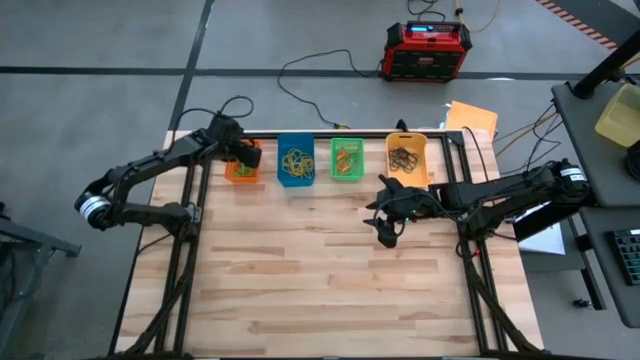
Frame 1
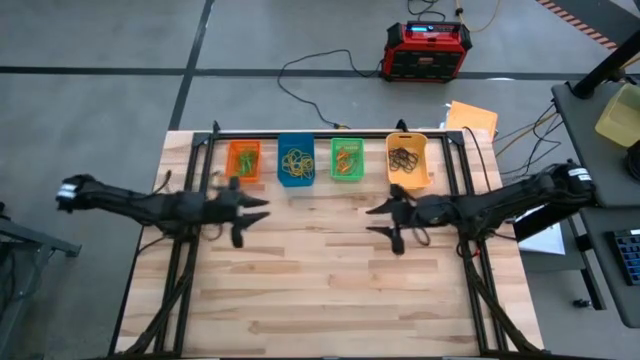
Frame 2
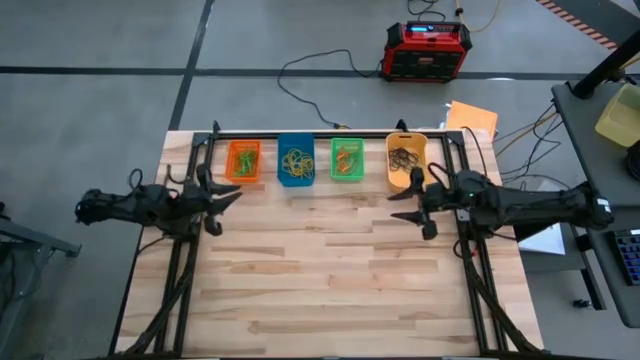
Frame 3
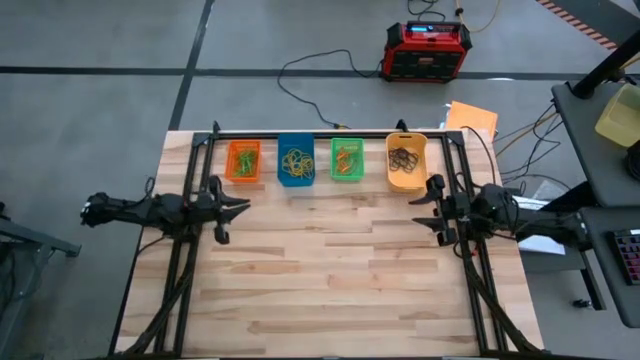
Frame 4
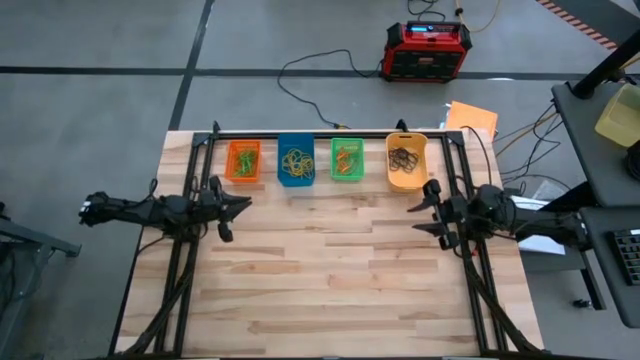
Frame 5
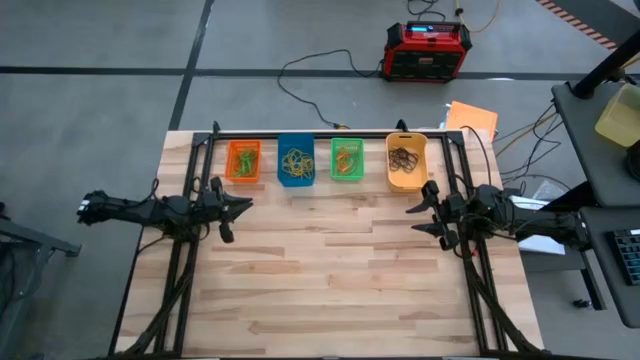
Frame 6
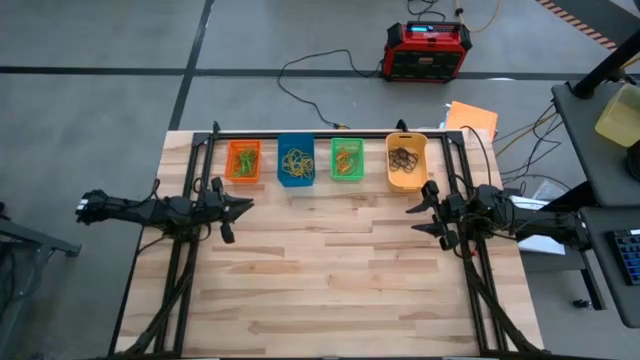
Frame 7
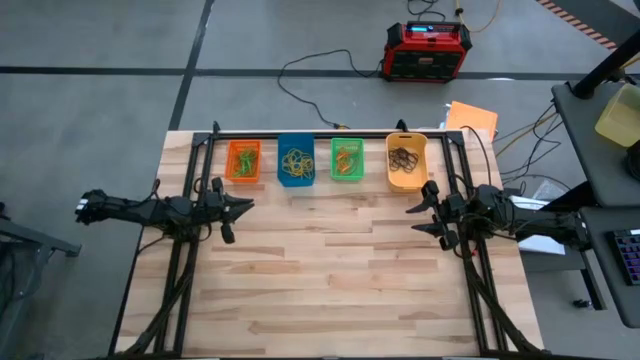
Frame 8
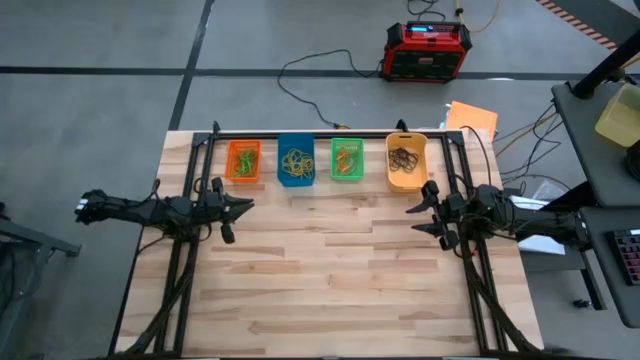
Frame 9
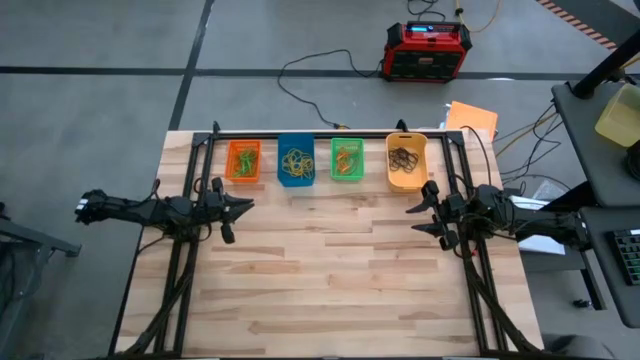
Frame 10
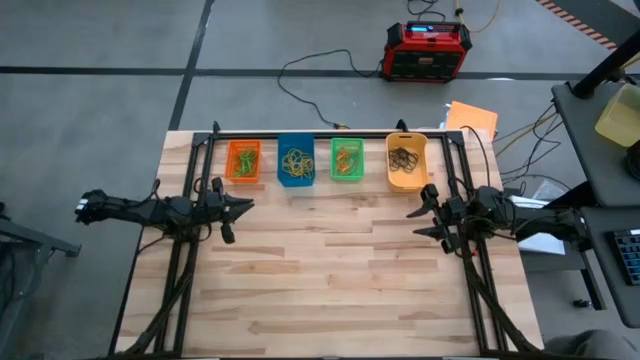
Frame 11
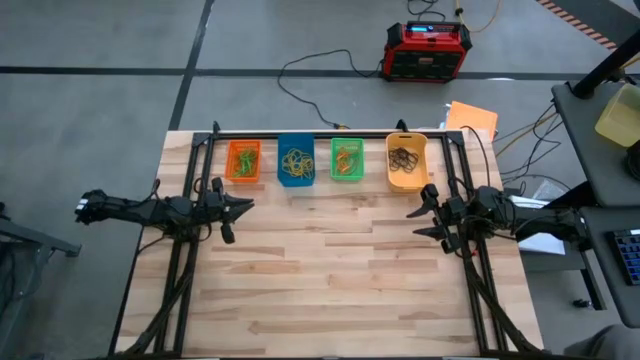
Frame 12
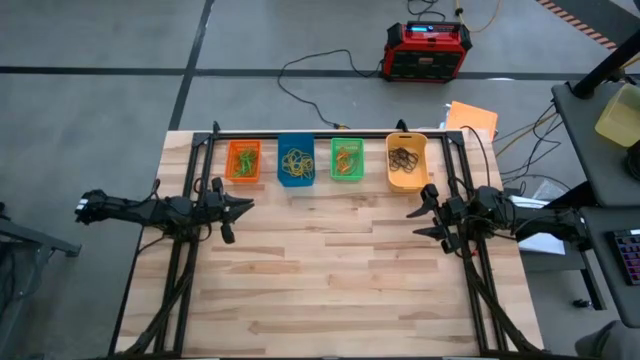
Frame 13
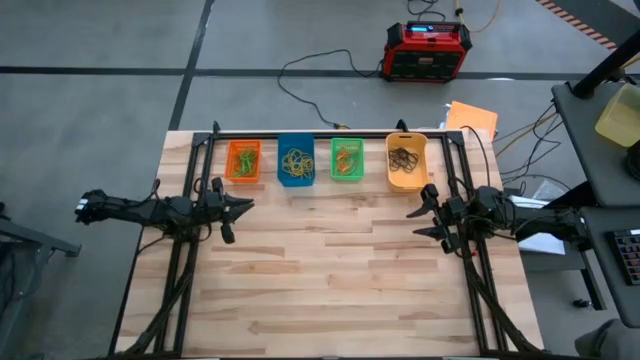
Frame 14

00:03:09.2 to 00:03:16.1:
Task: Sort rubber bands into baskets
Return to Home Position

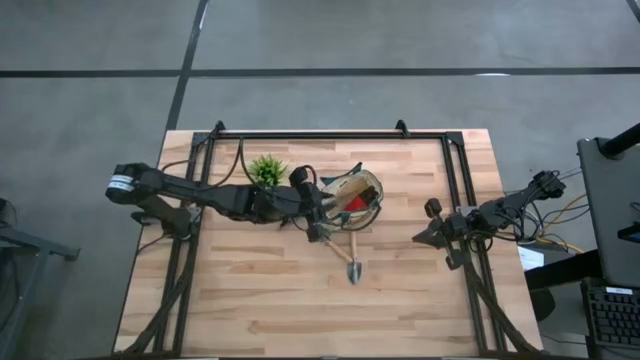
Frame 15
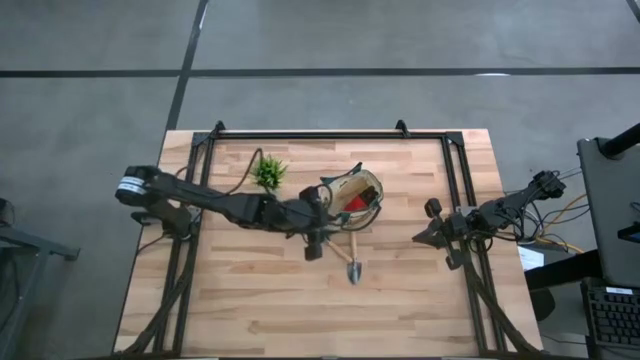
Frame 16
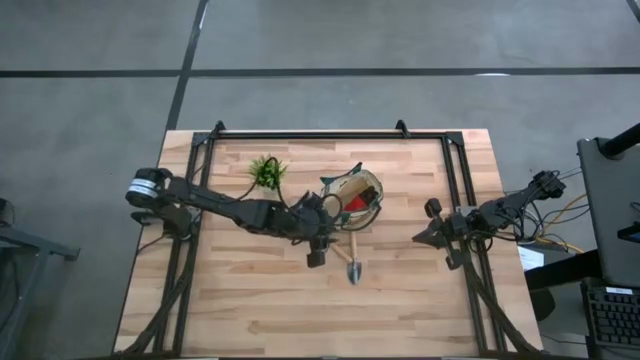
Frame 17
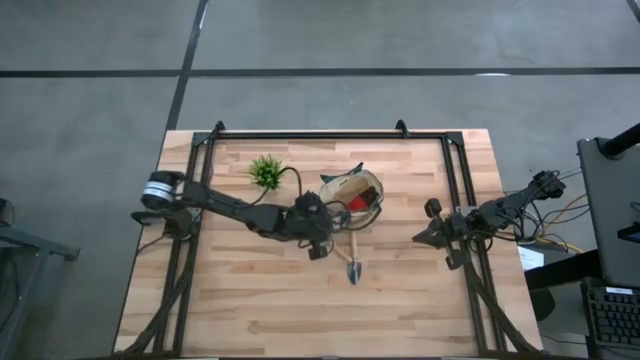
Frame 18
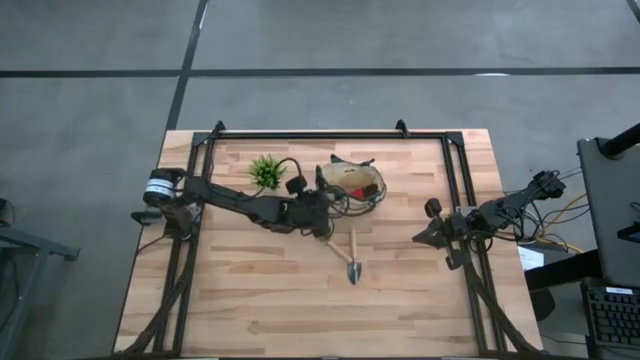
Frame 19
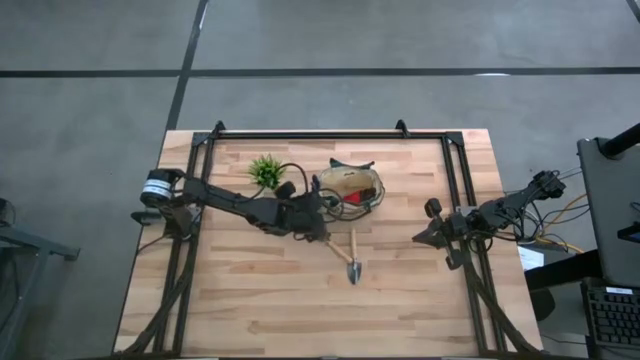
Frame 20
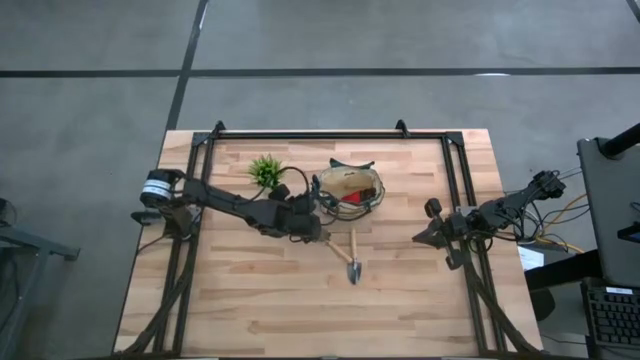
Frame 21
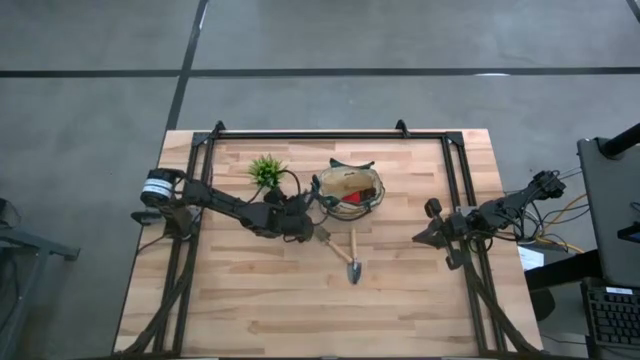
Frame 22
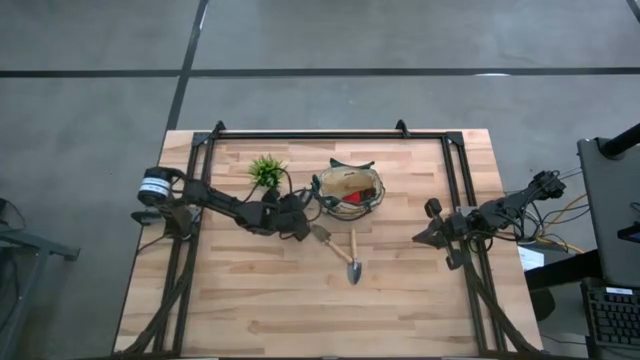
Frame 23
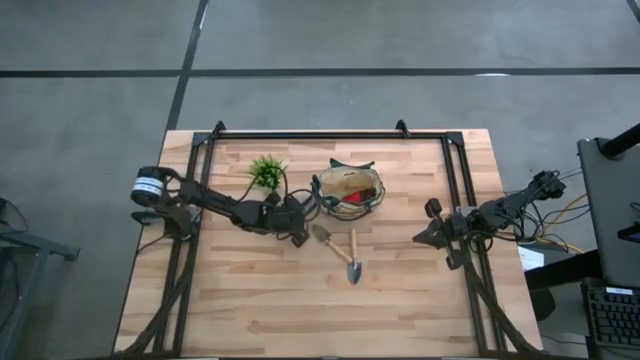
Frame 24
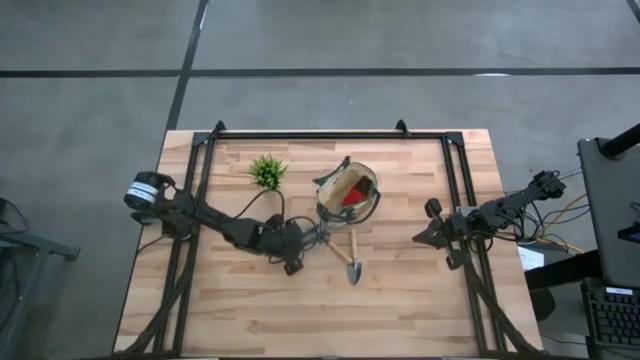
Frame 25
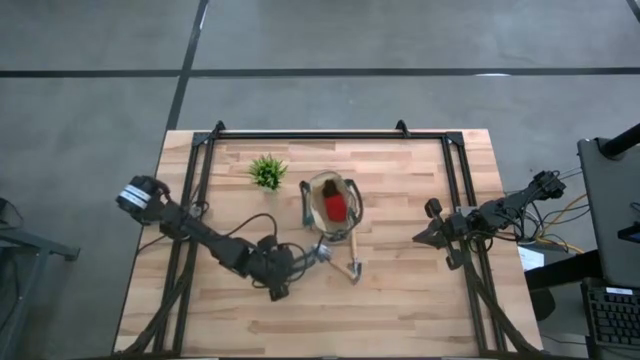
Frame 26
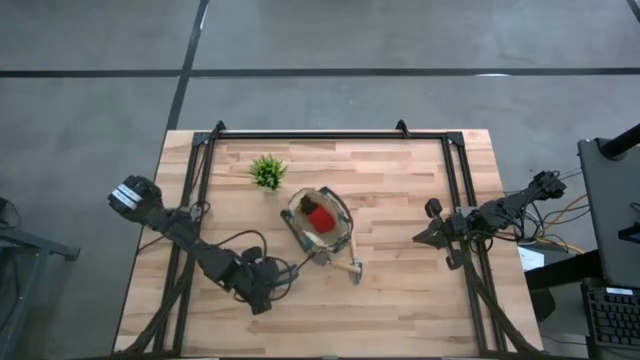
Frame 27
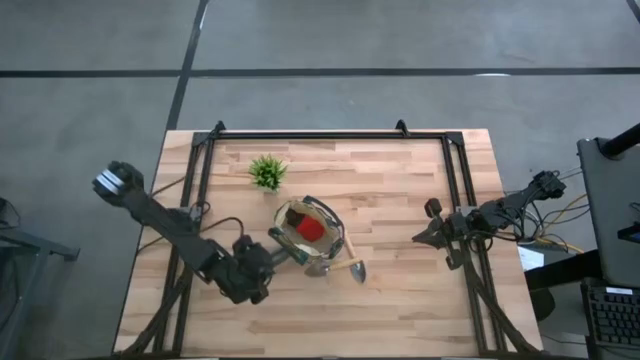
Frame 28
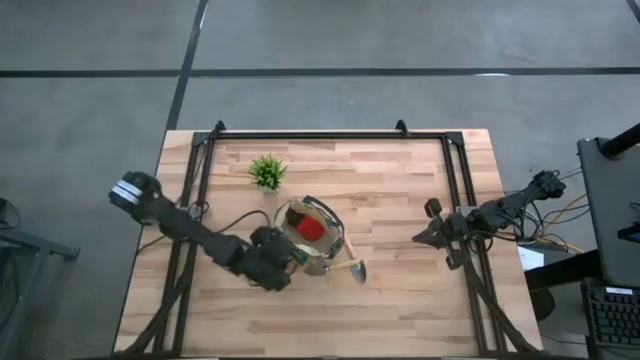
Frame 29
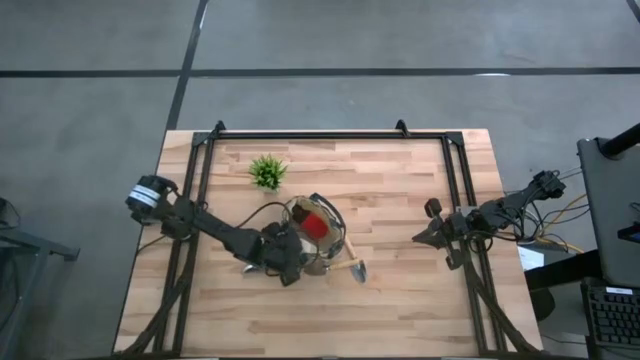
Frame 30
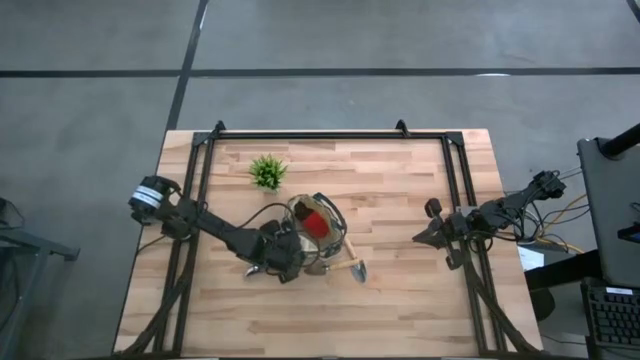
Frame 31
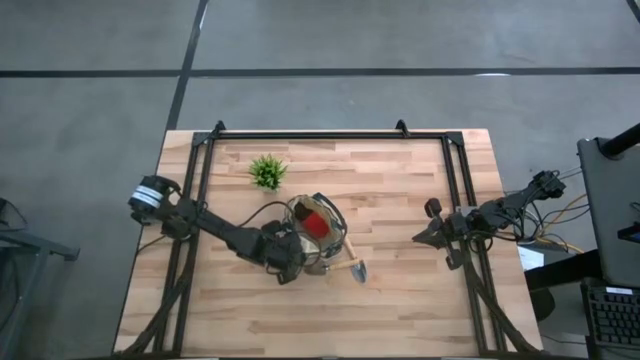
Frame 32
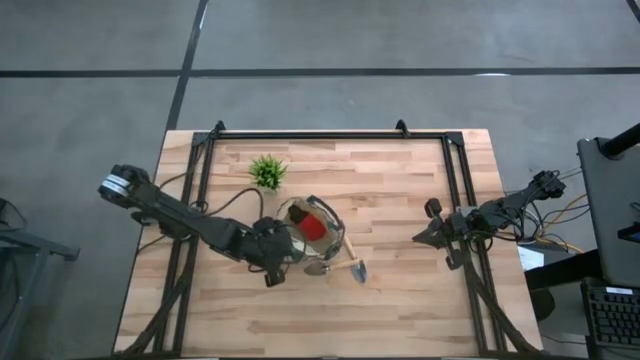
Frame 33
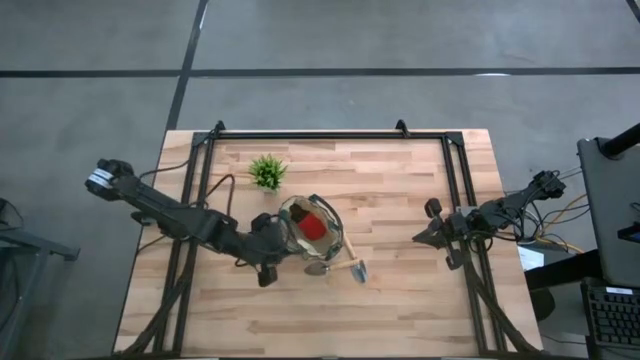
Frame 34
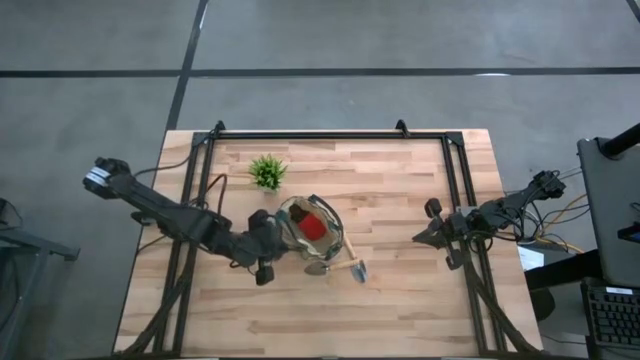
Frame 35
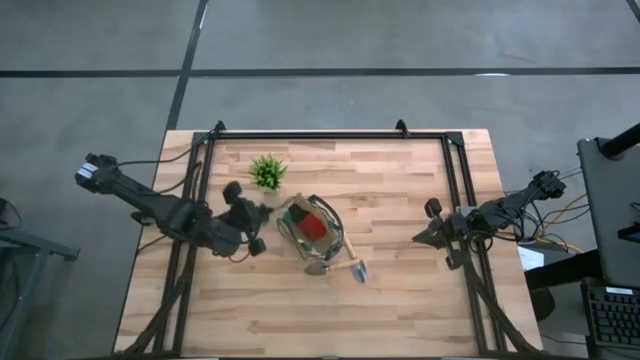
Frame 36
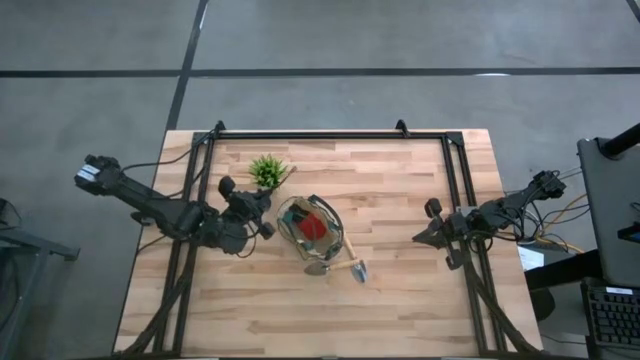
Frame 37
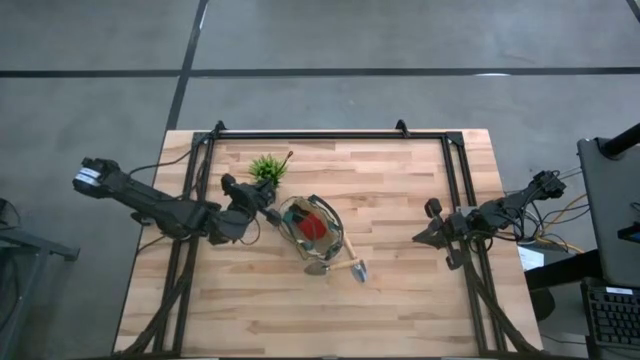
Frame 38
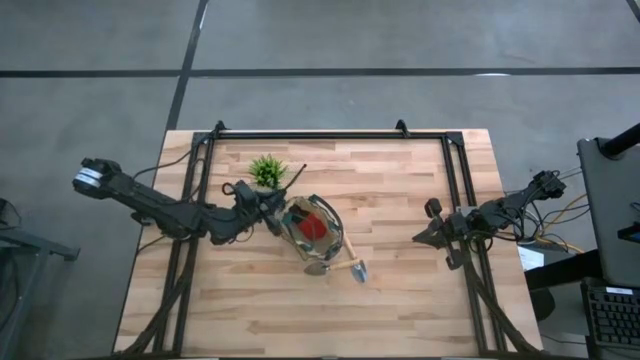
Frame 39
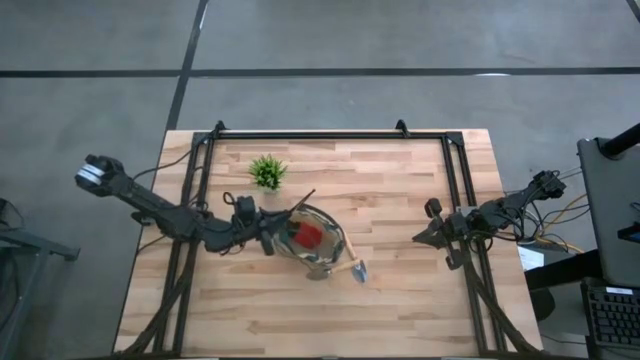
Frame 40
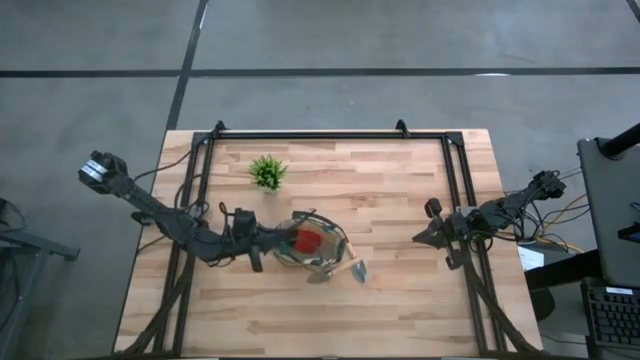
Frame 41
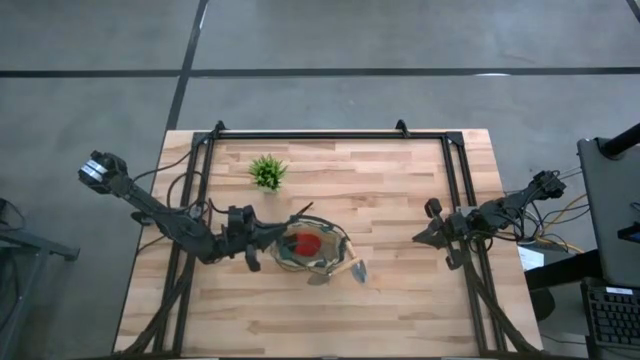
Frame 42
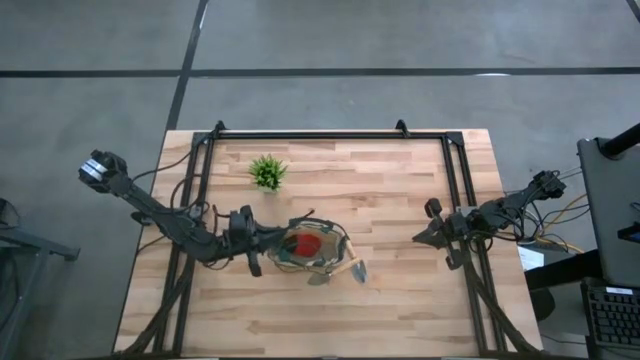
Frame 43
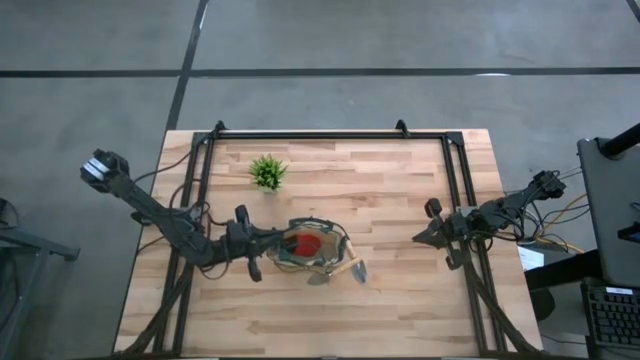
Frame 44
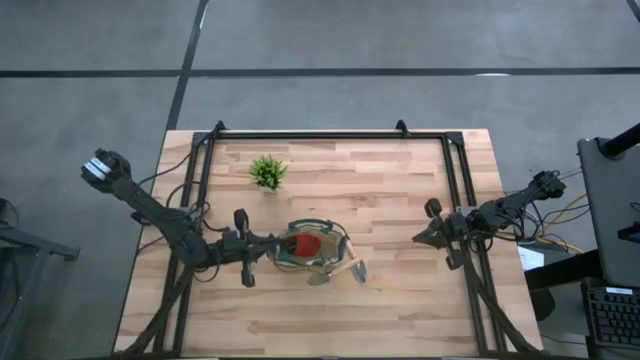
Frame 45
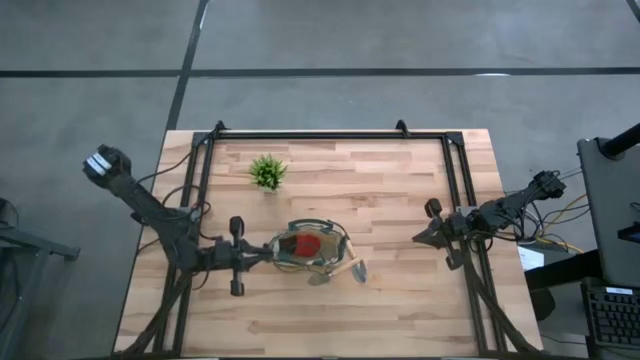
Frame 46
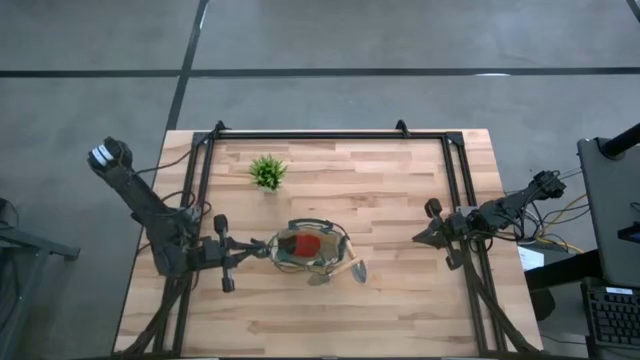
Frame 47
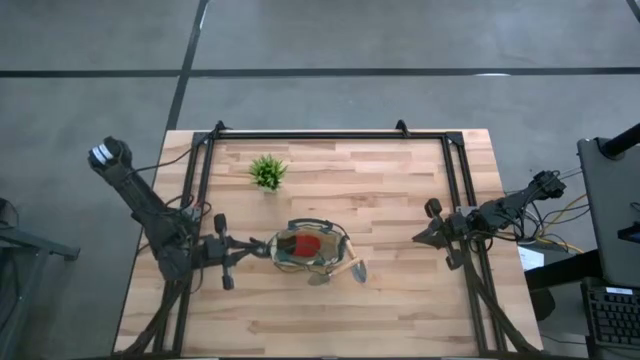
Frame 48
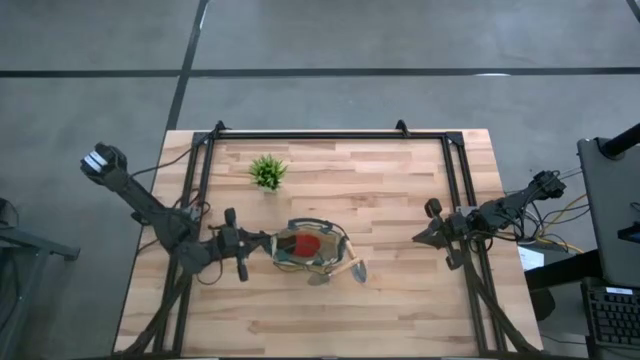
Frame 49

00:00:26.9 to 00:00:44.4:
Task: Pick & Place Garden tools in Gardening bag
Put the green shear scissors into the gardening bag
